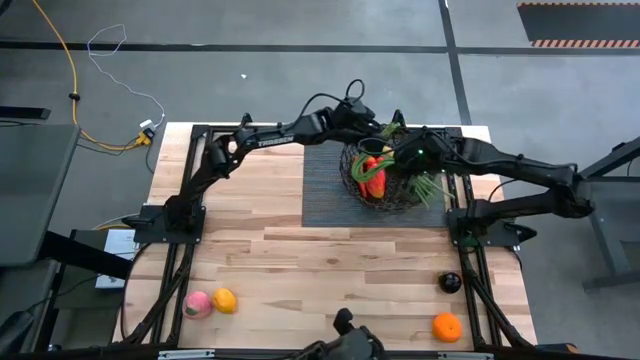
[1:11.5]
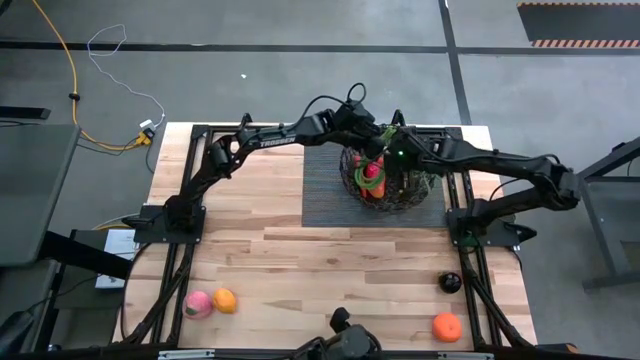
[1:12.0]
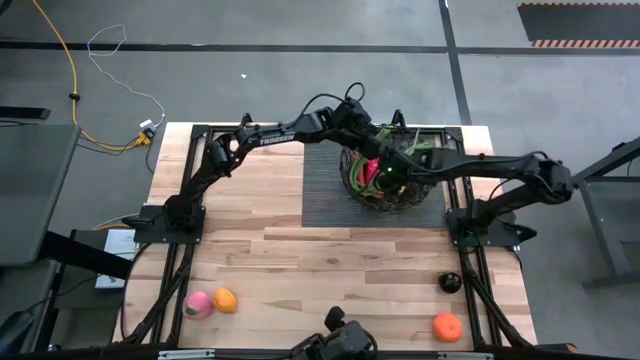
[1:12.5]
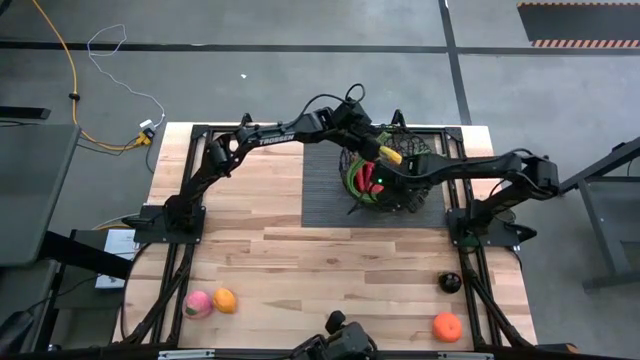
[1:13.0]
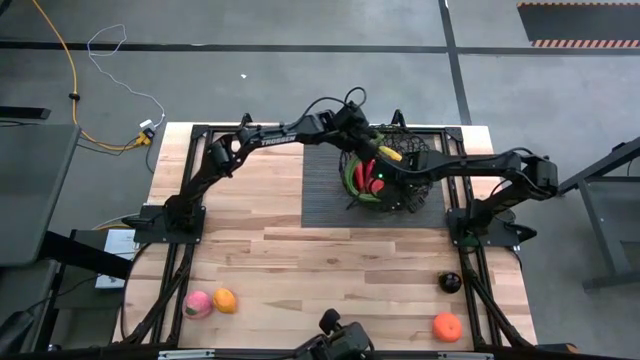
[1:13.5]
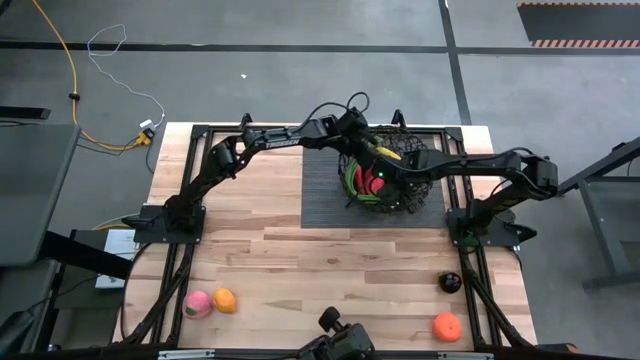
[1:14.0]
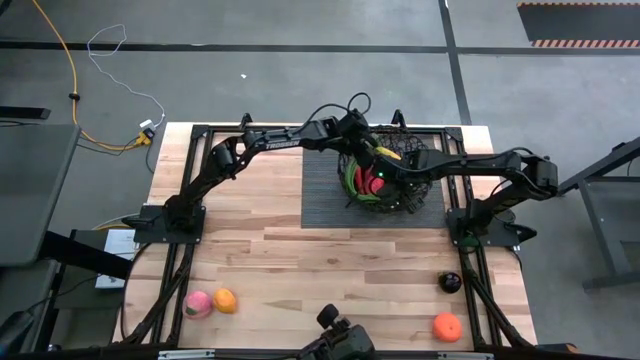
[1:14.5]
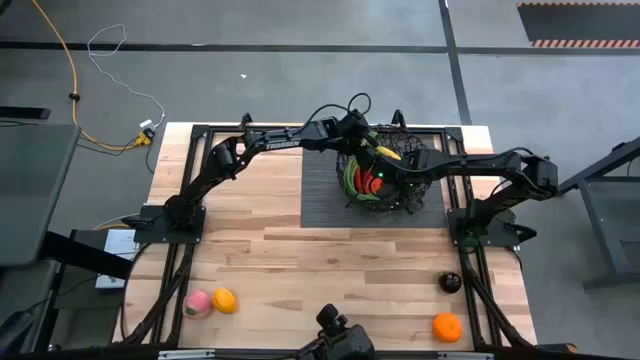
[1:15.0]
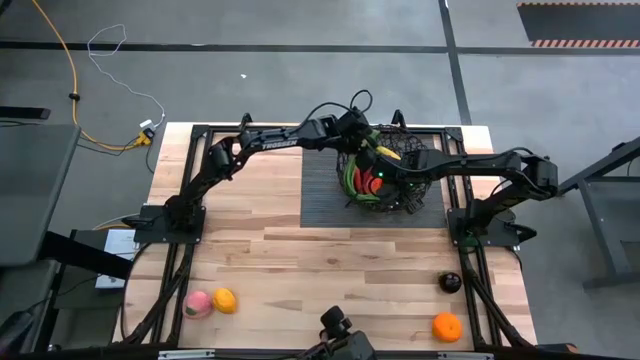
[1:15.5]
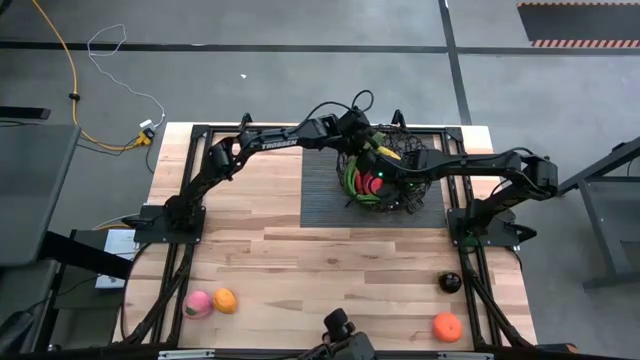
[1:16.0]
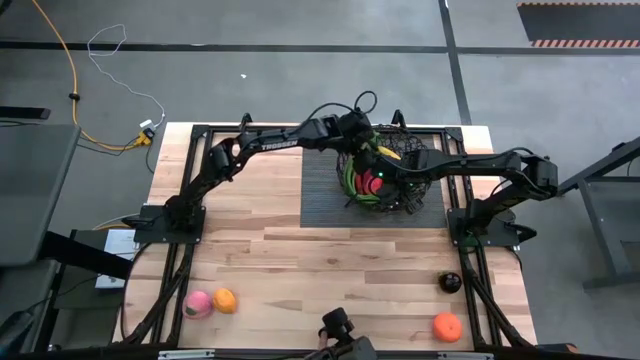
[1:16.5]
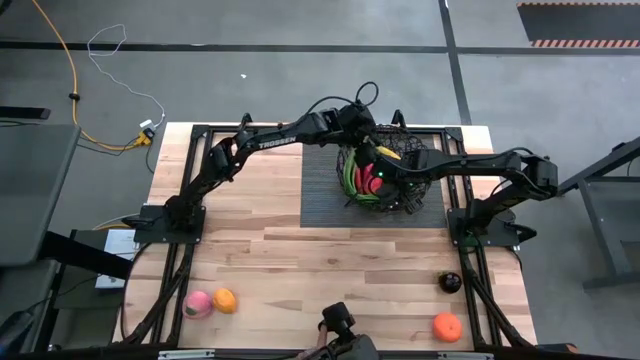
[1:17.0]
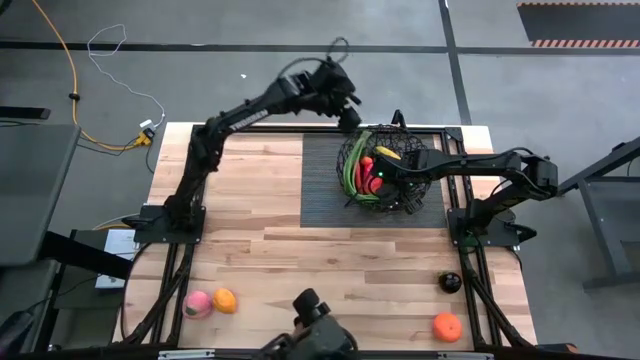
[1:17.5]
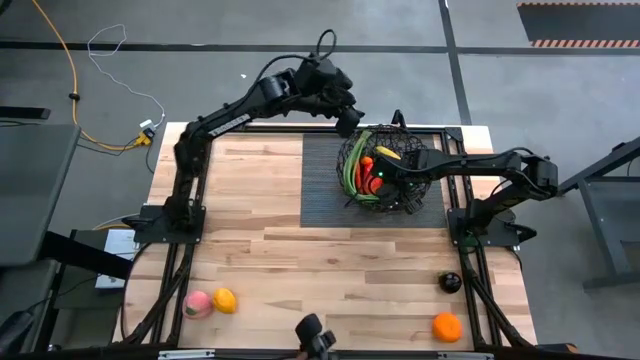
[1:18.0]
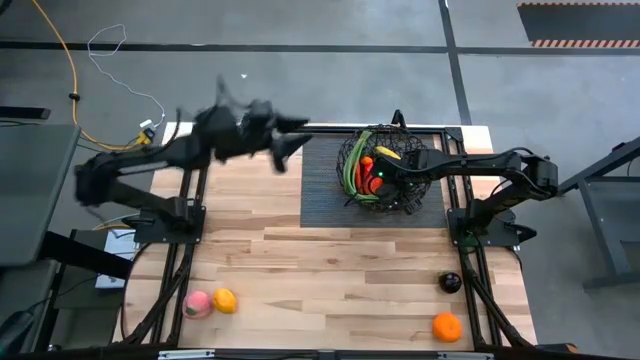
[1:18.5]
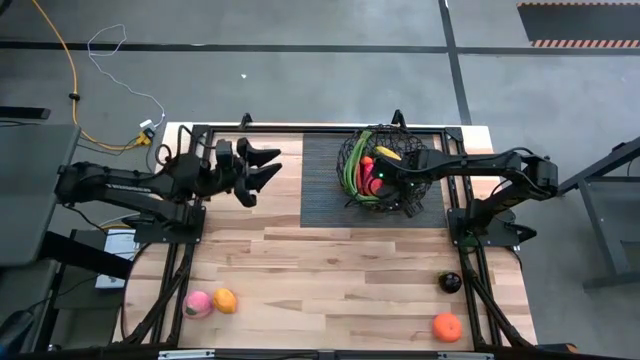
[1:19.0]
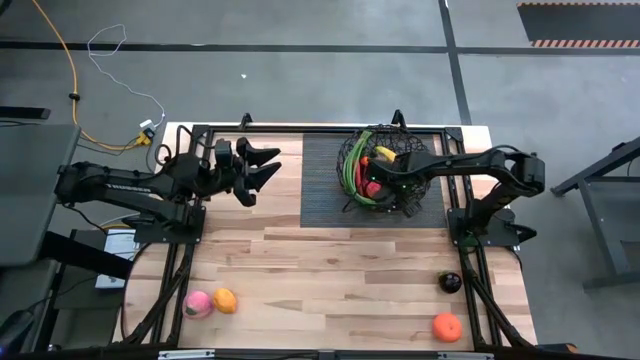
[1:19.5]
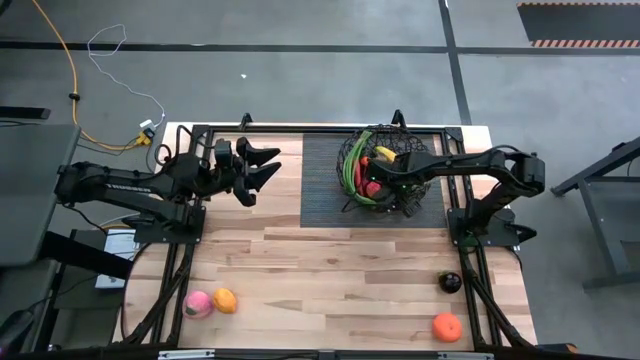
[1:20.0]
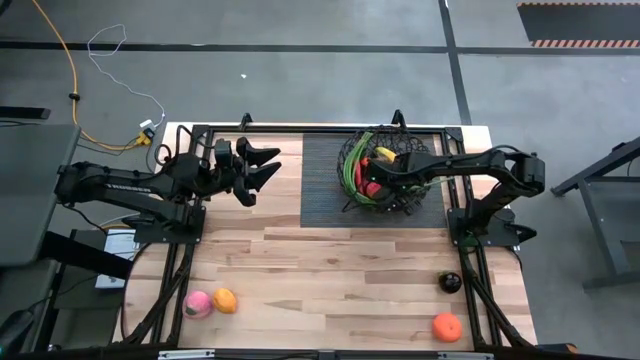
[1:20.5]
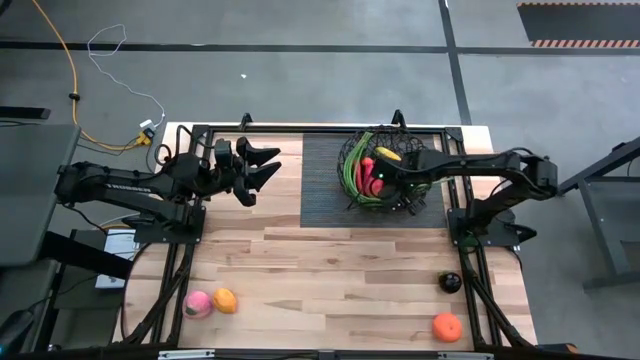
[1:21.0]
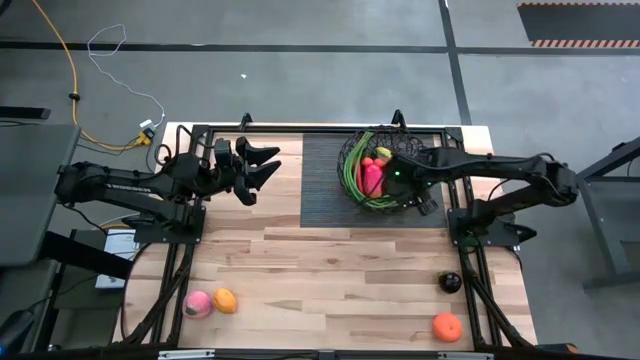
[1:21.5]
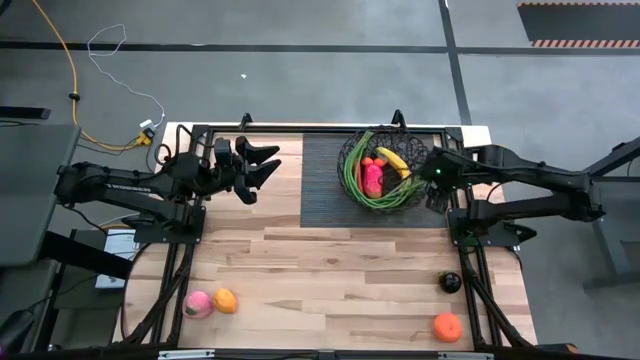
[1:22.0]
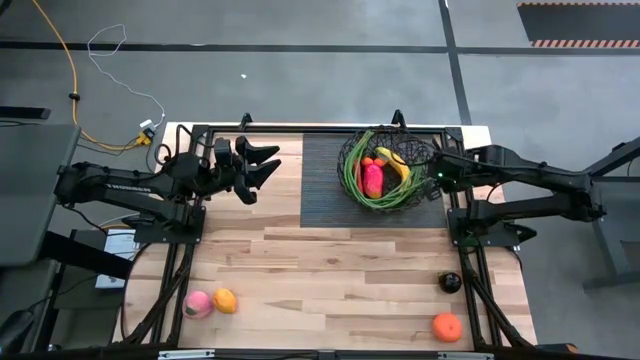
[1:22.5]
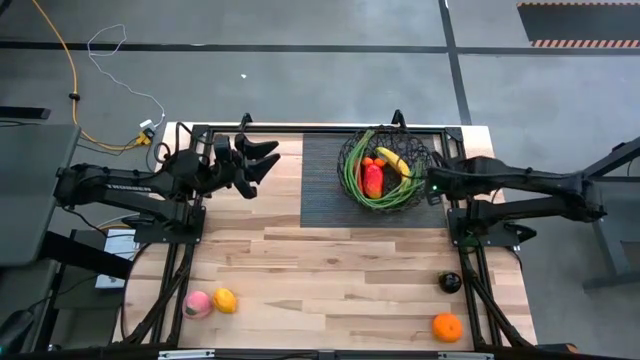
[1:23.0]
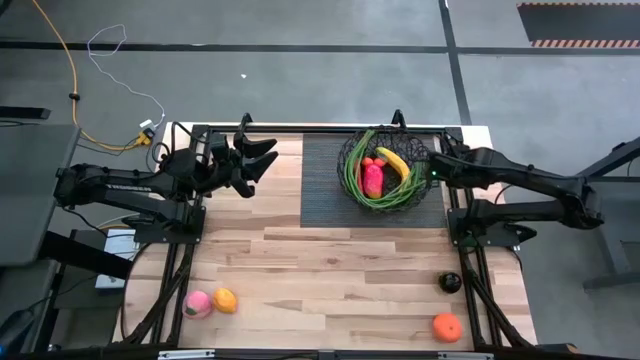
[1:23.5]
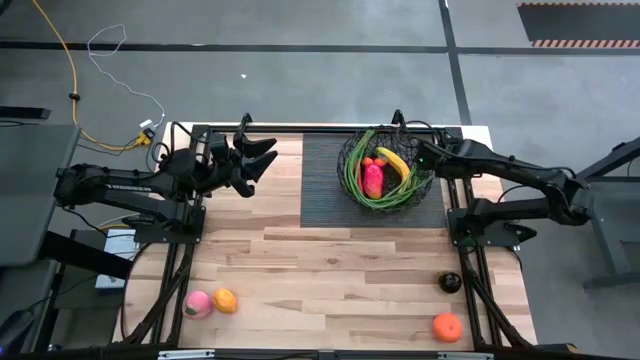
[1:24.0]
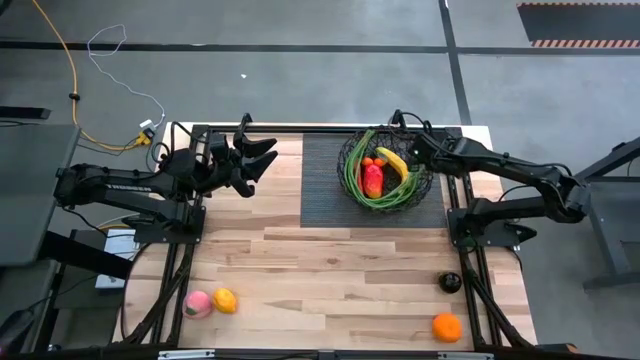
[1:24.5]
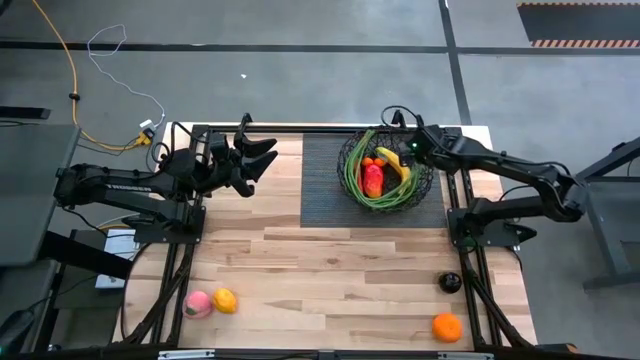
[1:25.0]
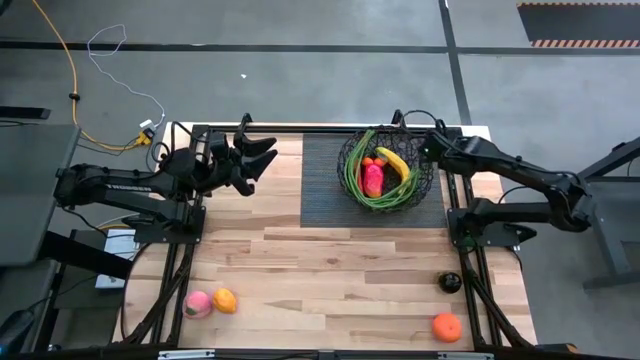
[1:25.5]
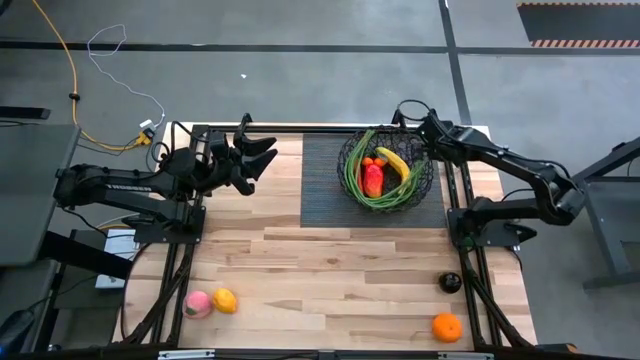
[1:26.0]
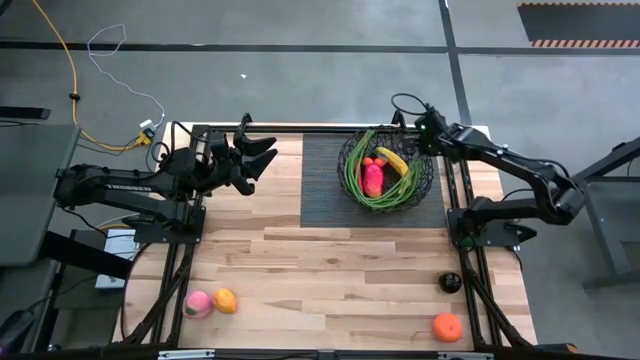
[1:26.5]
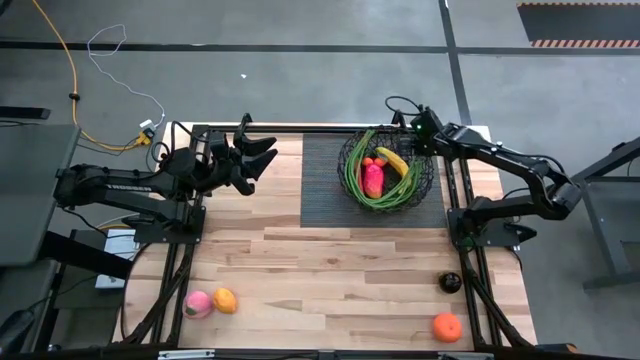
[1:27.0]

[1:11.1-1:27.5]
Task: Build produce basket
Put the green beans into the black basket
